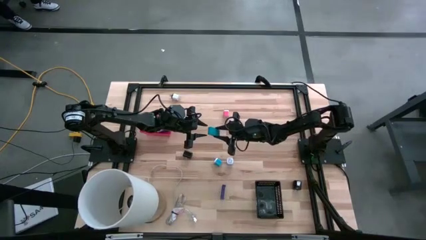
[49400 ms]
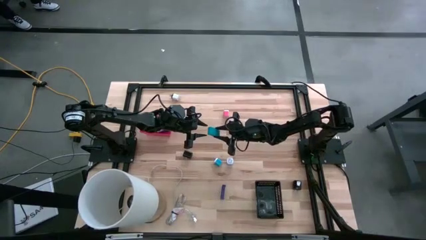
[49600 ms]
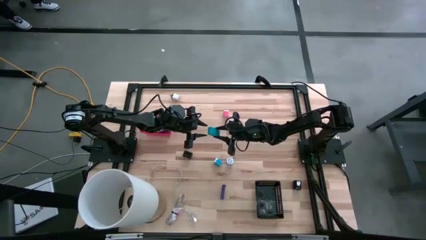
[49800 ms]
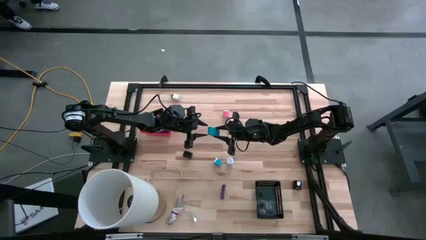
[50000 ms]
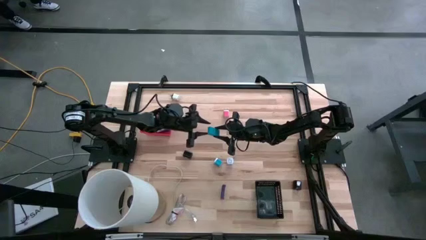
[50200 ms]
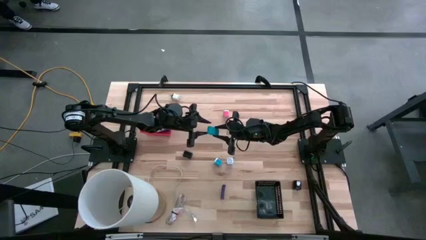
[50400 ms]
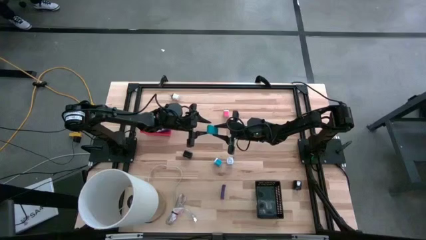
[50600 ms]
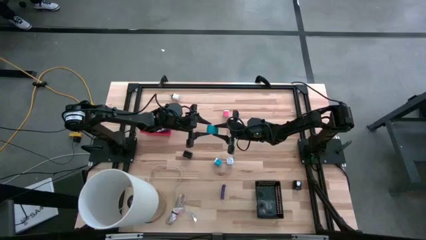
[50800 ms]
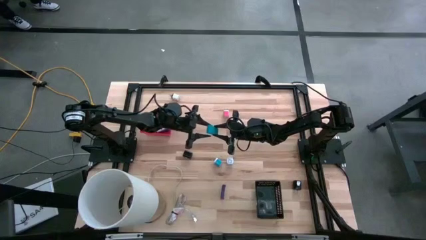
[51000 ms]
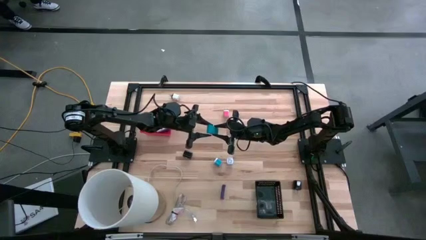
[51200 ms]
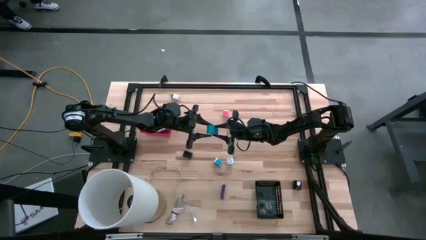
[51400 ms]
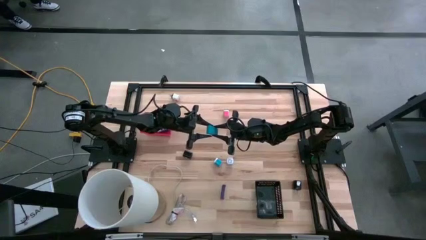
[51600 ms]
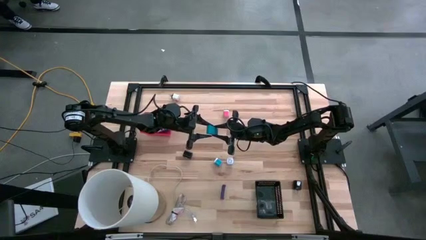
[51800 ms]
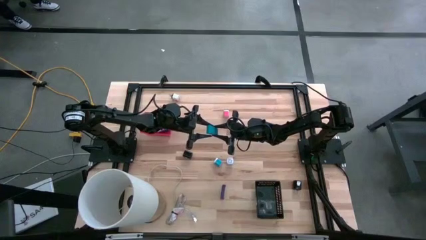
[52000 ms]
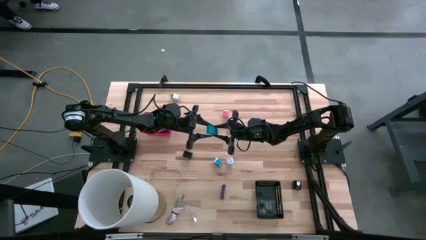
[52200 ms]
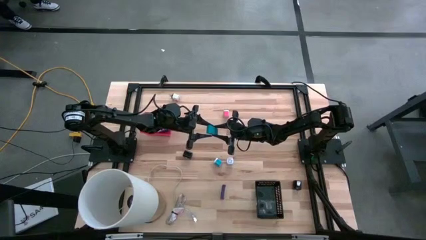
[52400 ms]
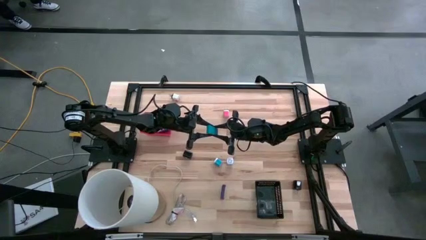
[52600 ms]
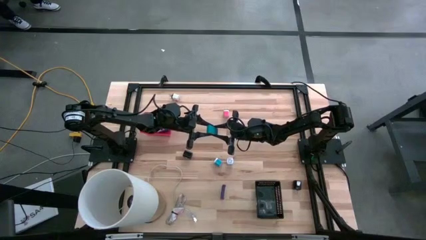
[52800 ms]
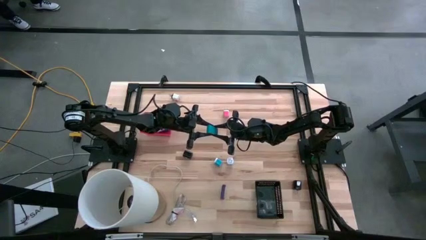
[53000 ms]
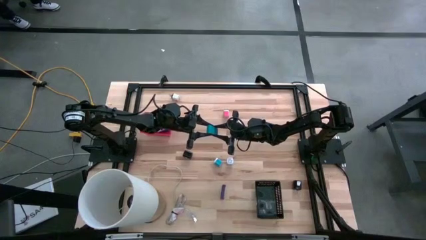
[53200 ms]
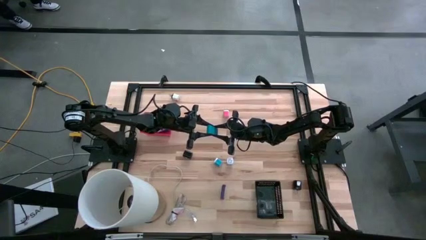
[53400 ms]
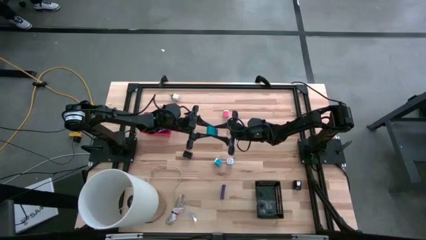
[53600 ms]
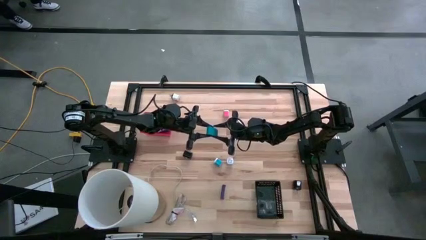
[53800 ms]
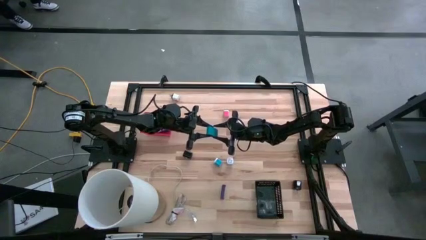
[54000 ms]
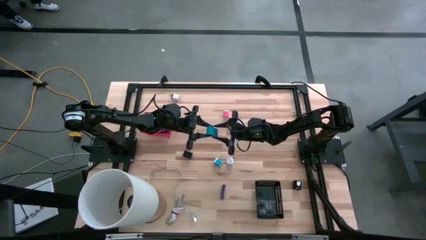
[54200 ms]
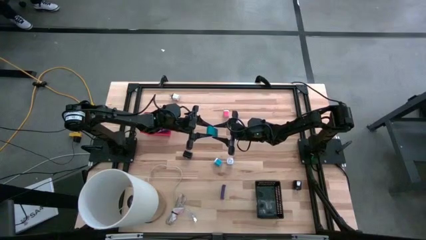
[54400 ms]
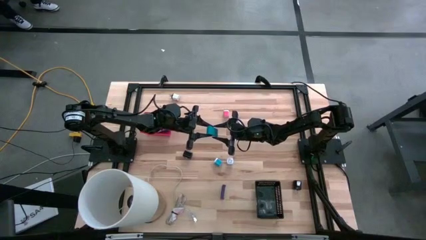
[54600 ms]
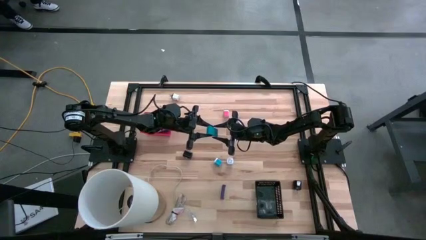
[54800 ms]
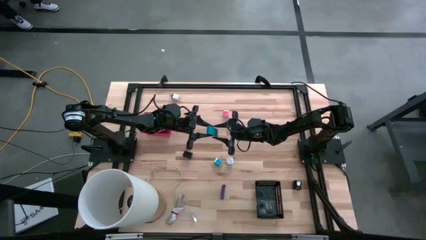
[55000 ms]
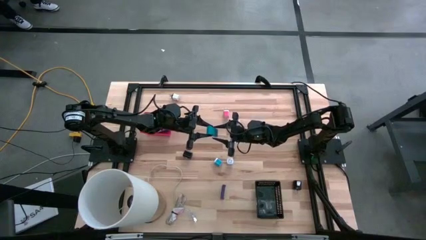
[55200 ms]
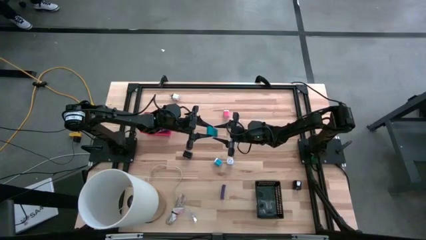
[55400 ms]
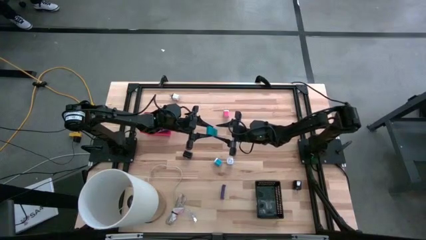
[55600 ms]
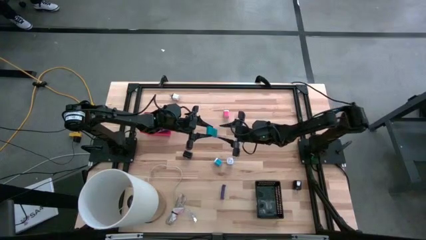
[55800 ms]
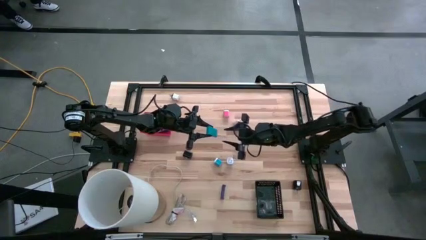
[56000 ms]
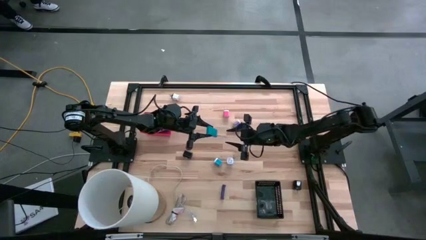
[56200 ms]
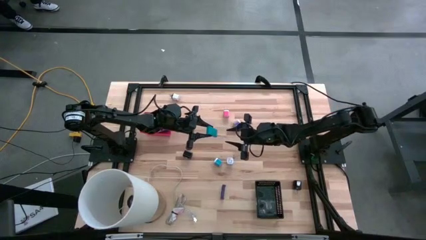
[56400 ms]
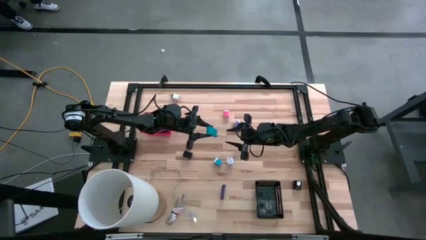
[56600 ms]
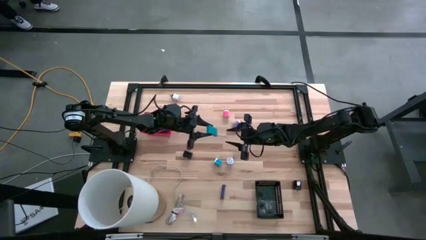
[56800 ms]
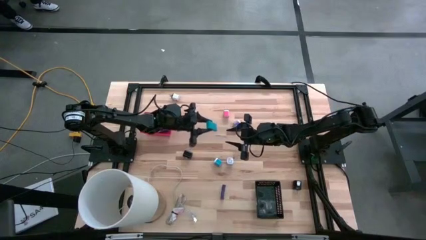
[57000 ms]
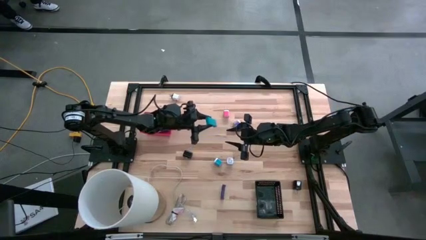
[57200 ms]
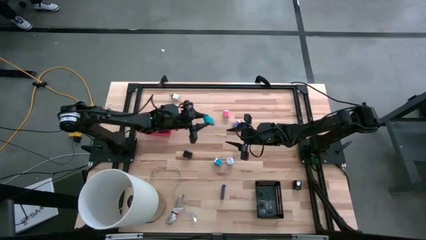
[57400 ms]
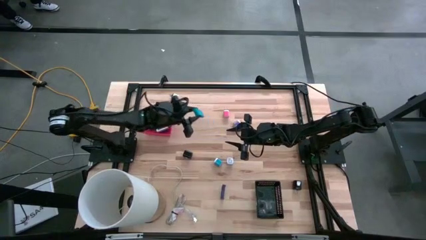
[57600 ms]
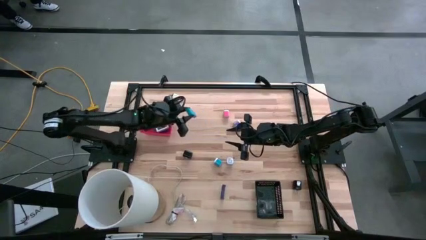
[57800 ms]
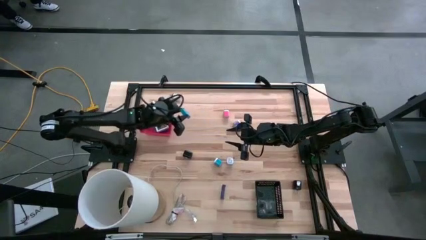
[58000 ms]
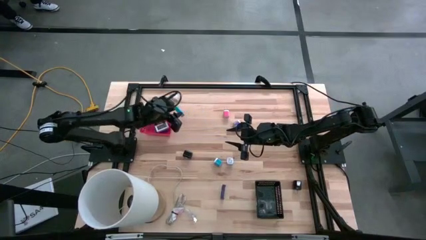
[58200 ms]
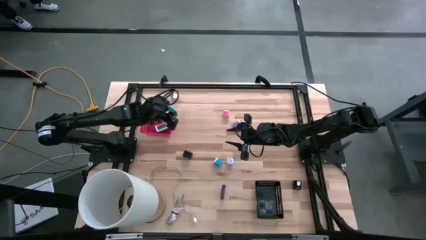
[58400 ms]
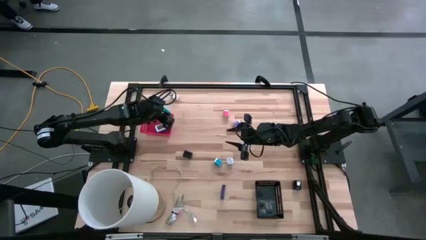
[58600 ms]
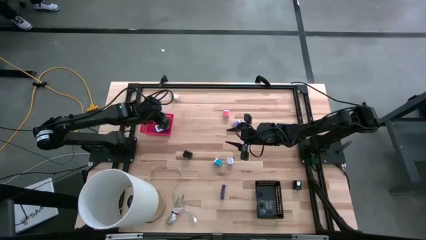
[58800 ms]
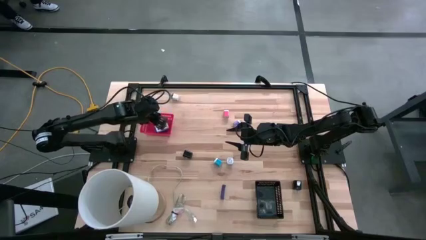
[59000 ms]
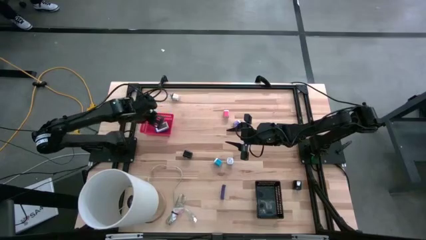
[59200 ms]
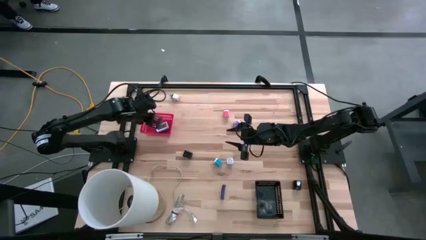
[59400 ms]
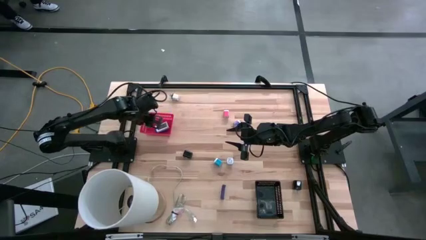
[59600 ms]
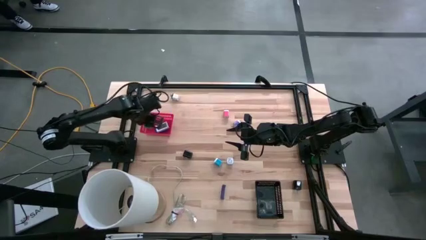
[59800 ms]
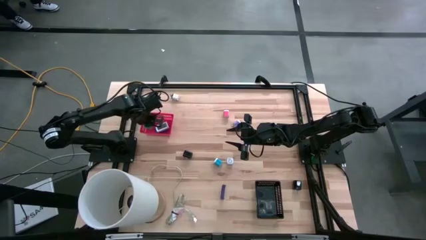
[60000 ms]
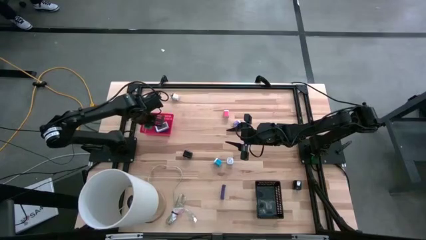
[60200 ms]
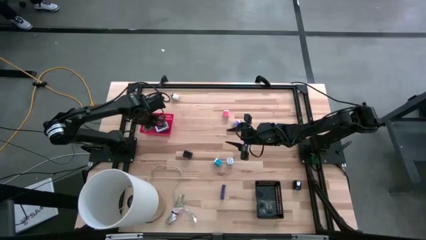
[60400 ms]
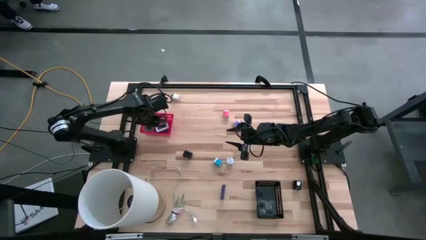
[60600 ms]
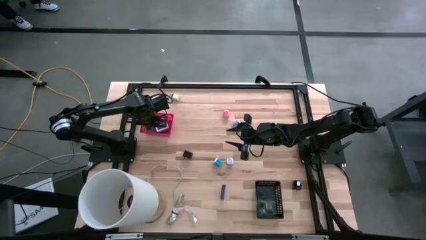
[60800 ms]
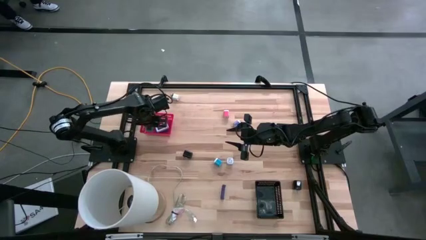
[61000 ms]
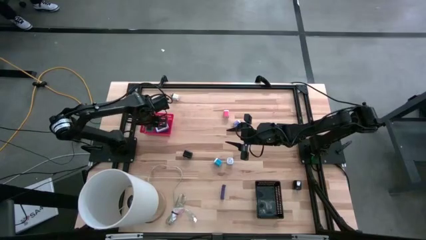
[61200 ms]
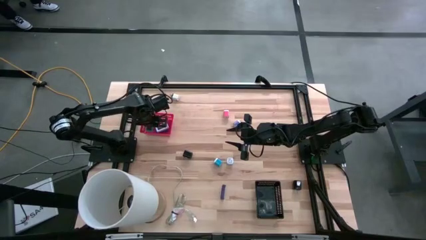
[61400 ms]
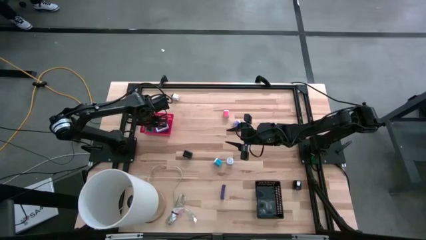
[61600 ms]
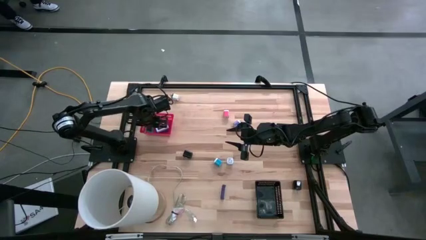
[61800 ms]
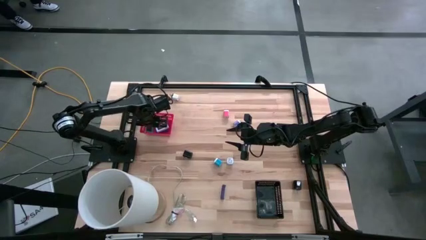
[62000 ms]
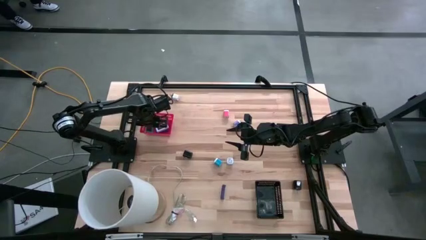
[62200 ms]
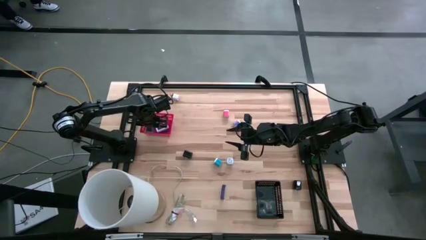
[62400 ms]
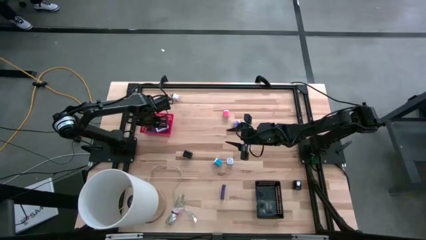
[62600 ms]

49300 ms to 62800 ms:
Task: Pick & Place Office items
Put the blue digital clock into the red bin
